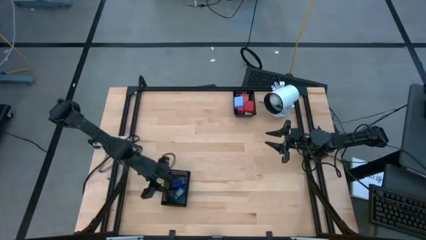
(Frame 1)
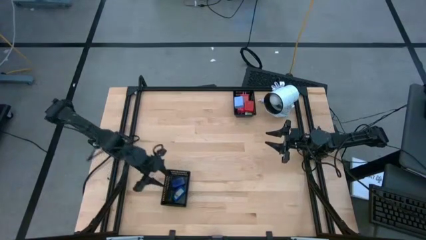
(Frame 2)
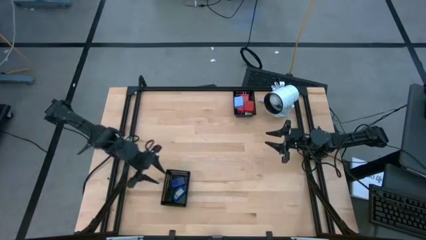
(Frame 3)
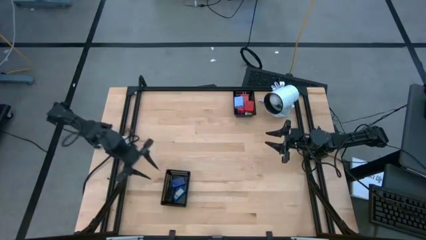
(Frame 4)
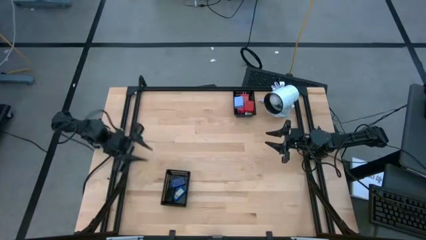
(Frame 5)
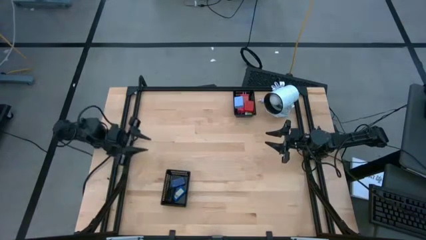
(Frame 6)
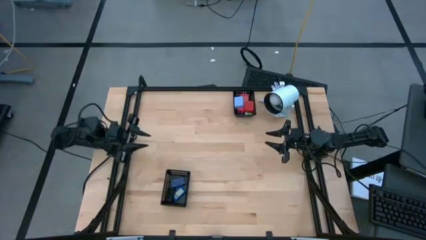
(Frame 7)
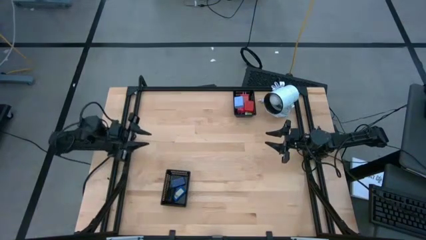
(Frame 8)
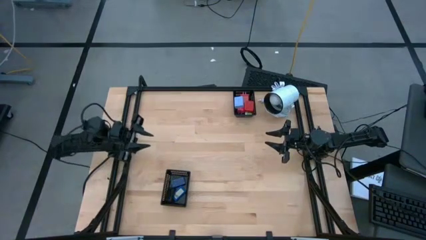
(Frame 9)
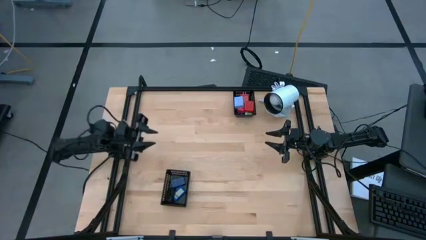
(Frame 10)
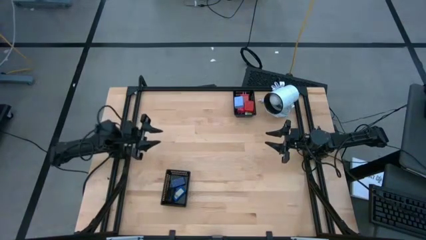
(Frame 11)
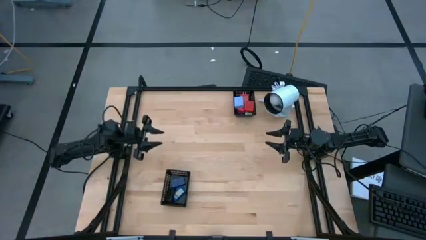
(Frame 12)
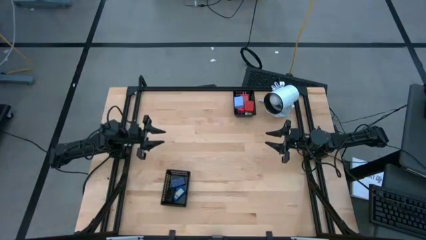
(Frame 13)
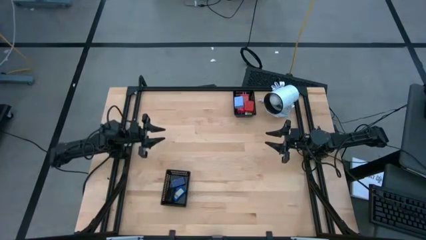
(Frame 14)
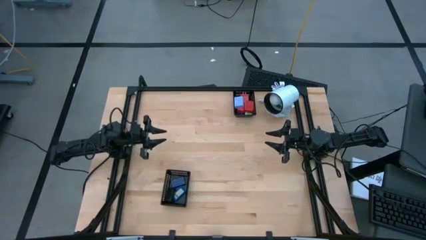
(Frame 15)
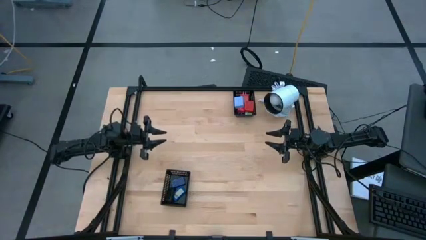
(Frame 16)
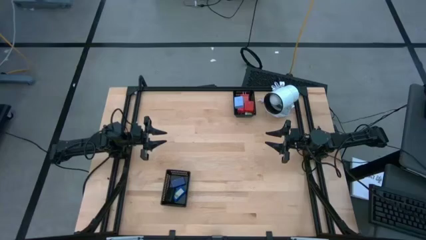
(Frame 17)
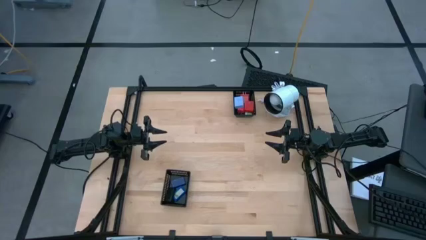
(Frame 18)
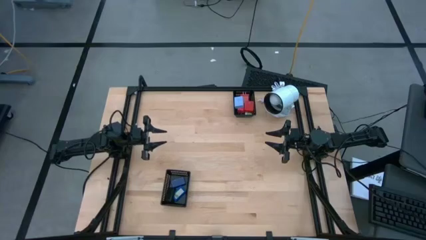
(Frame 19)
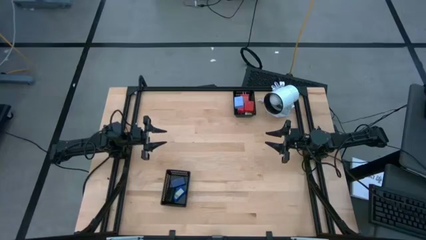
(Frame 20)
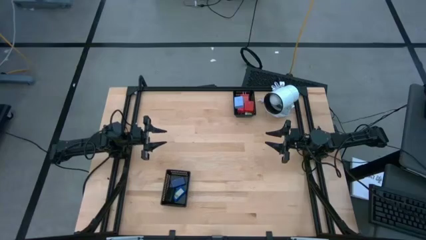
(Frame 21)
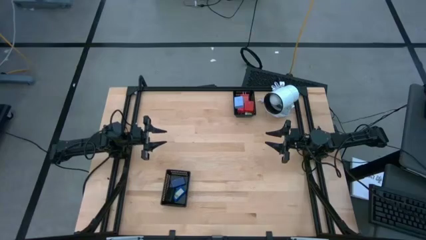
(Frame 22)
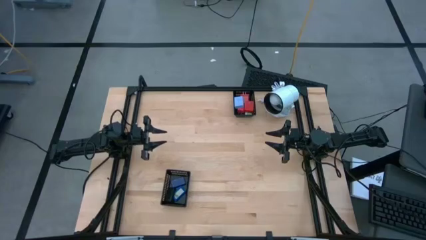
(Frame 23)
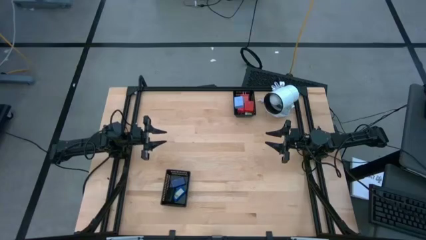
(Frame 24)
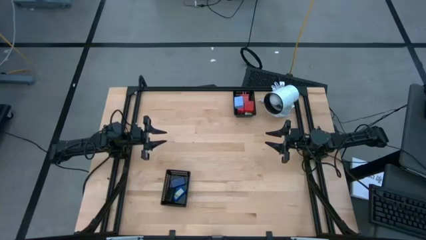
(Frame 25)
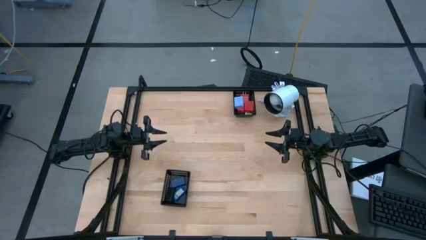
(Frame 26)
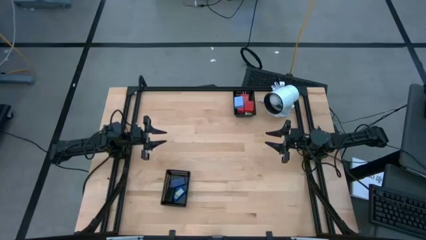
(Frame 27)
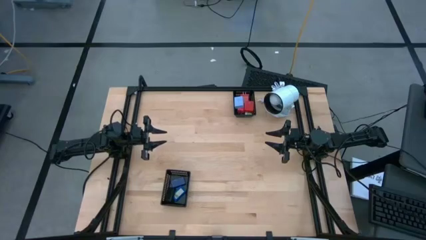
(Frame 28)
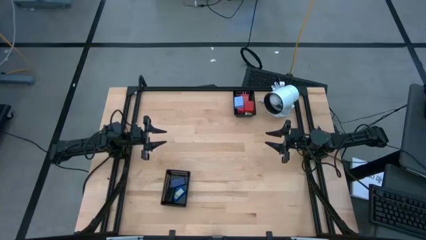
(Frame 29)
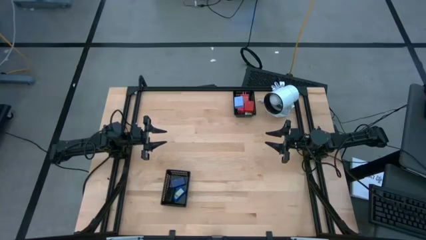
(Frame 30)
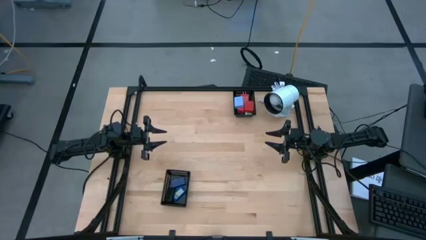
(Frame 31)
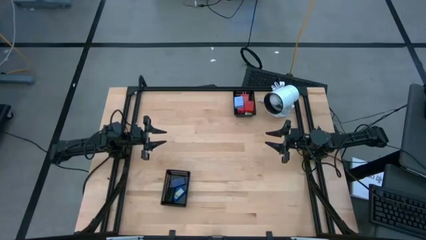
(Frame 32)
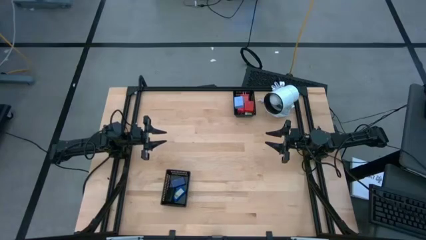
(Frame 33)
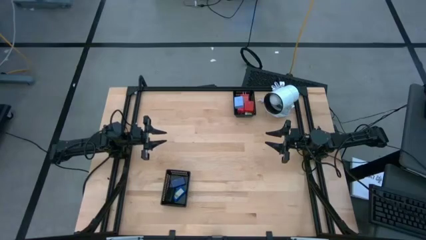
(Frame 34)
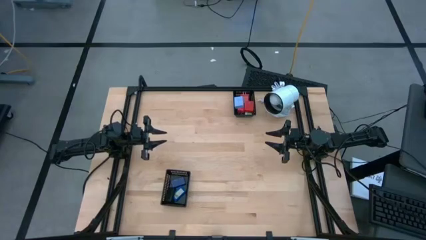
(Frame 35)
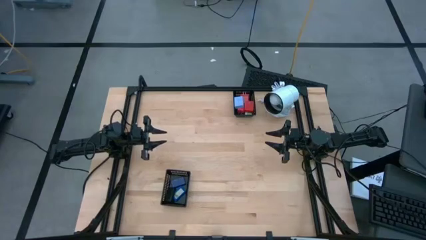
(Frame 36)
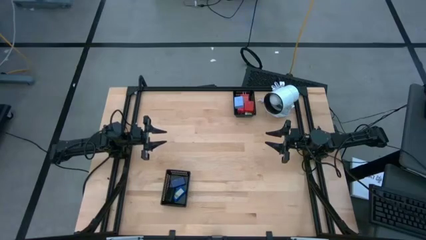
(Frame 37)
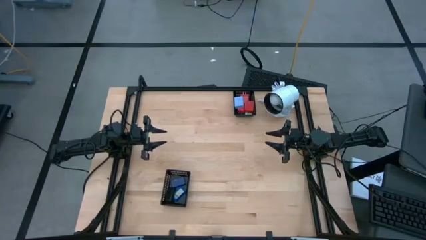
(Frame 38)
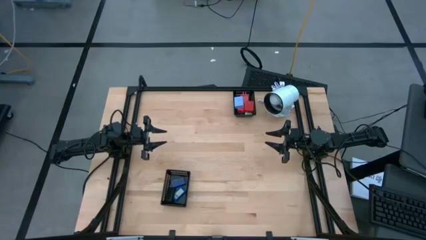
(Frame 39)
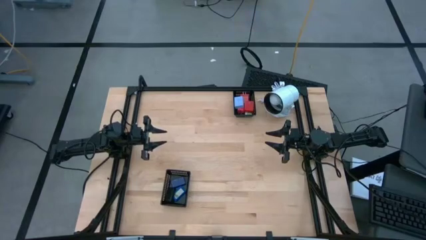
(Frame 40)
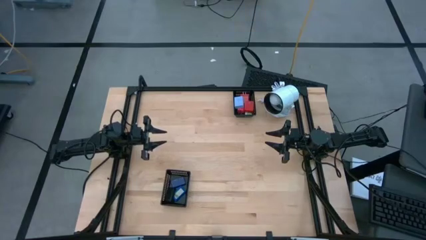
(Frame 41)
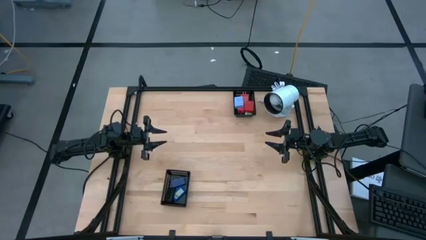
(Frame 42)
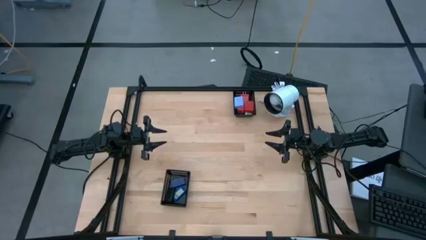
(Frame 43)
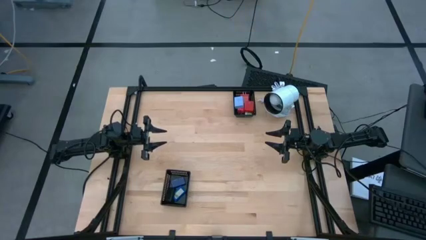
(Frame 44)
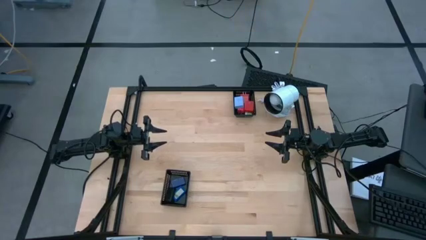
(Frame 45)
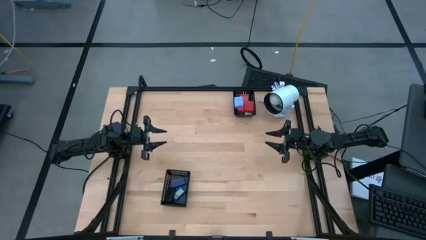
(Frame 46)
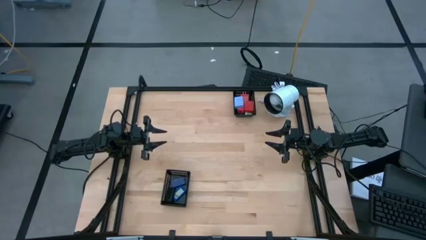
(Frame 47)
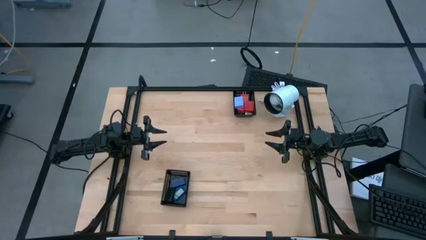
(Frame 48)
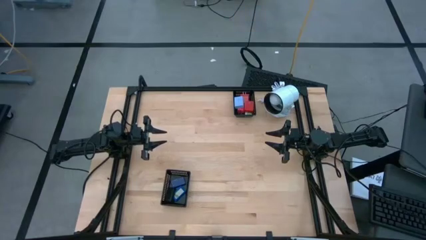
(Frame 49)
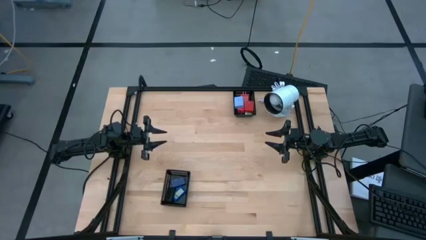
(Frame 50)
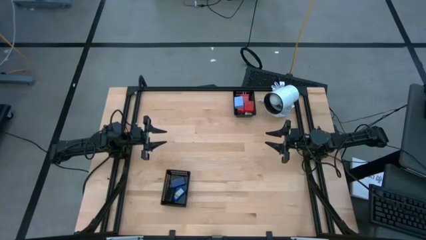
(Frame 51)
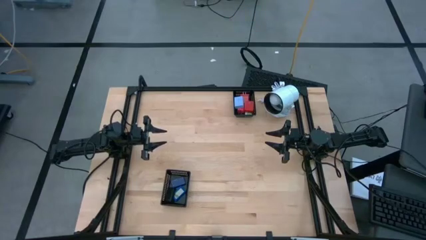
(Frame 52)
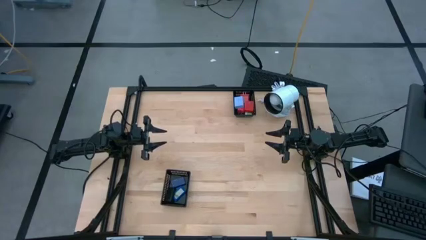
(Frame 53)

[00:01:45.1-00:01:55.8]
Task: Pick & Place Office items
Return to Home Position

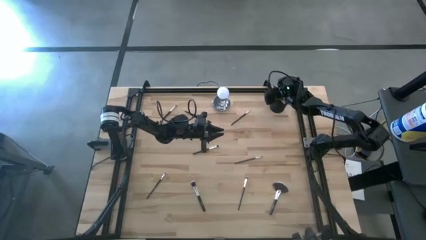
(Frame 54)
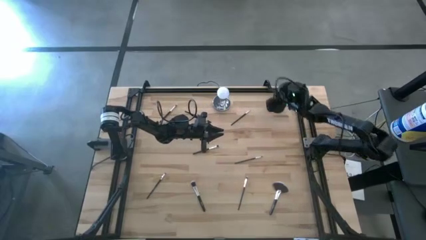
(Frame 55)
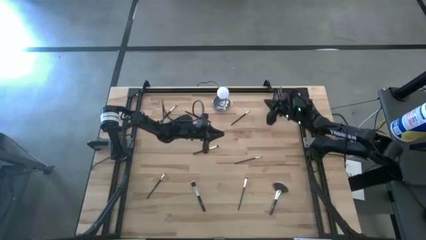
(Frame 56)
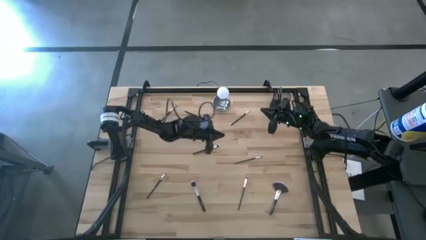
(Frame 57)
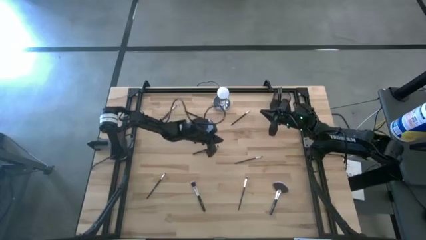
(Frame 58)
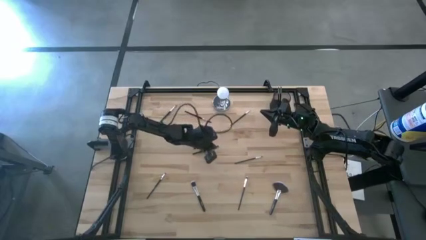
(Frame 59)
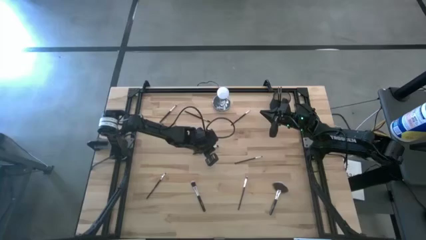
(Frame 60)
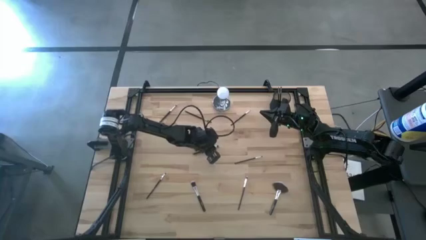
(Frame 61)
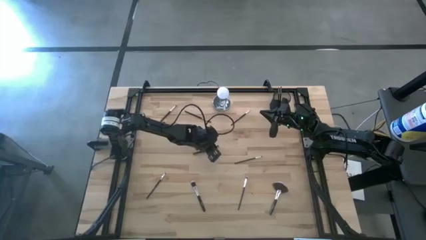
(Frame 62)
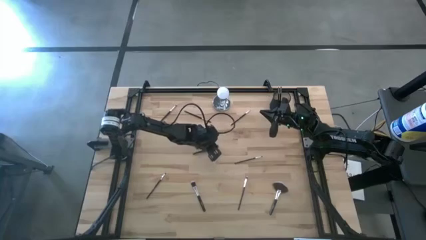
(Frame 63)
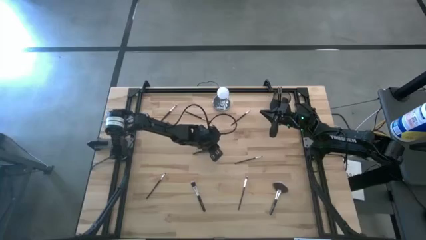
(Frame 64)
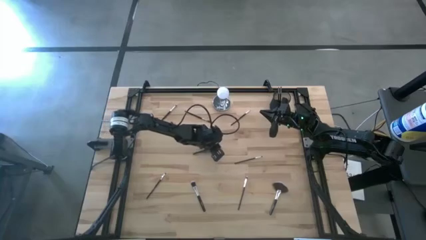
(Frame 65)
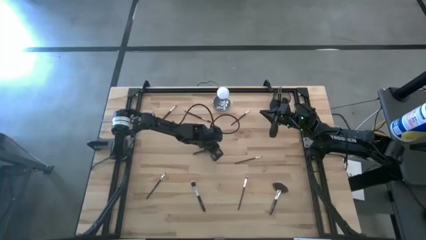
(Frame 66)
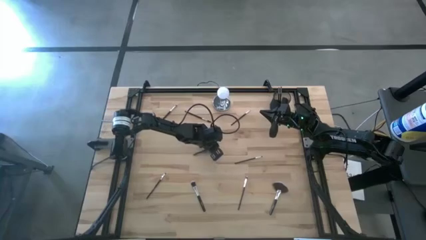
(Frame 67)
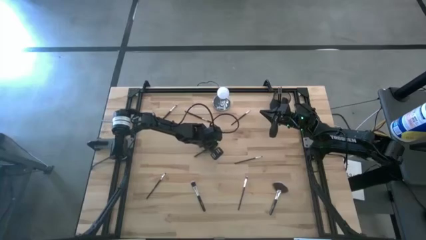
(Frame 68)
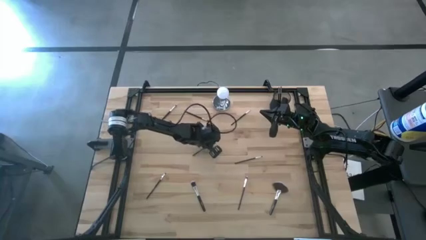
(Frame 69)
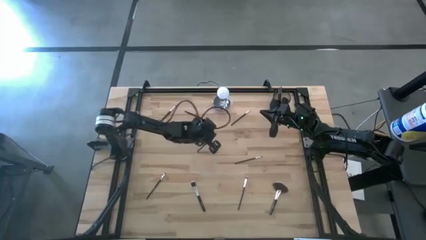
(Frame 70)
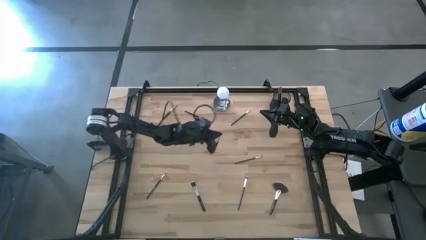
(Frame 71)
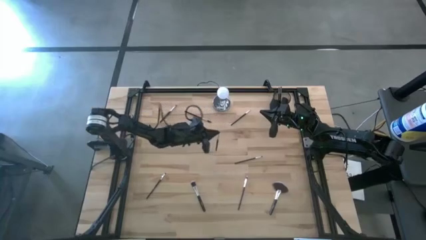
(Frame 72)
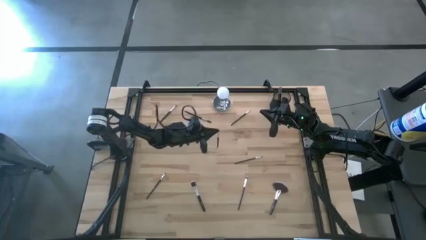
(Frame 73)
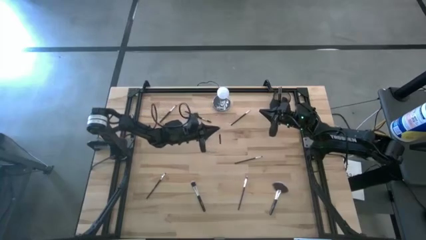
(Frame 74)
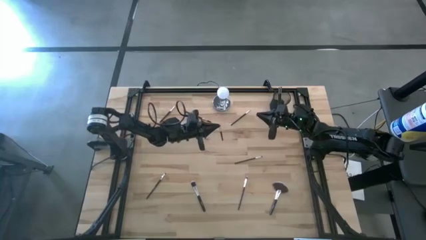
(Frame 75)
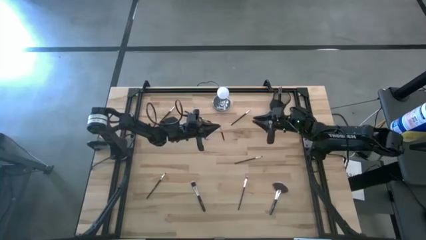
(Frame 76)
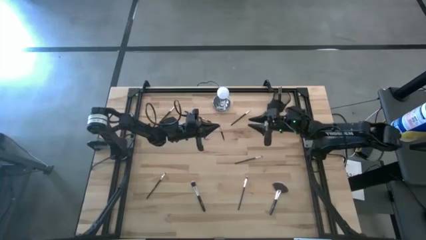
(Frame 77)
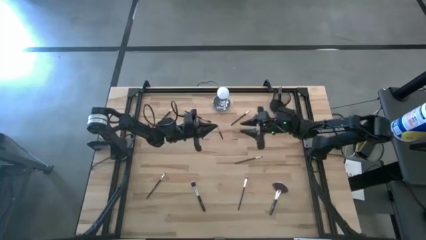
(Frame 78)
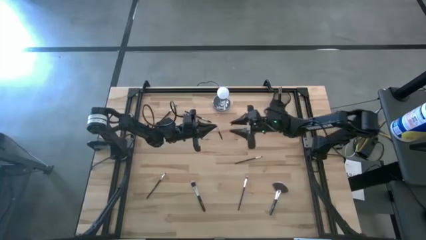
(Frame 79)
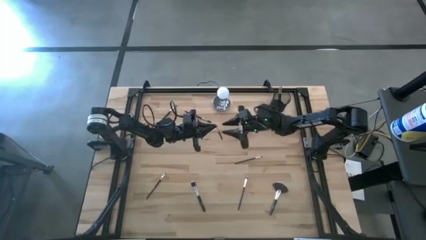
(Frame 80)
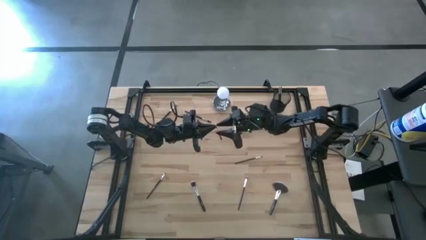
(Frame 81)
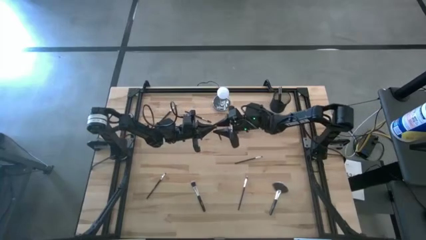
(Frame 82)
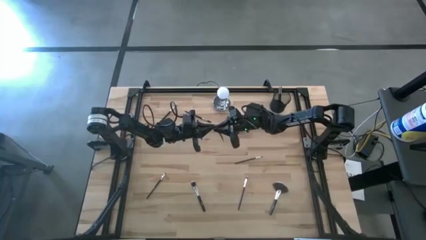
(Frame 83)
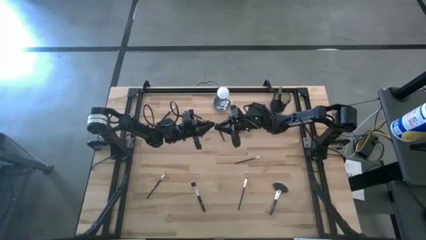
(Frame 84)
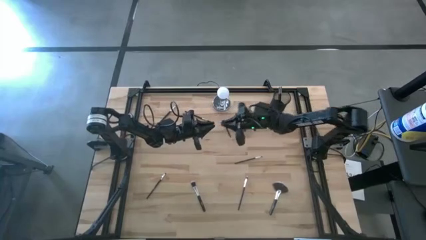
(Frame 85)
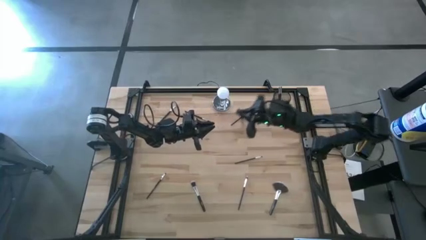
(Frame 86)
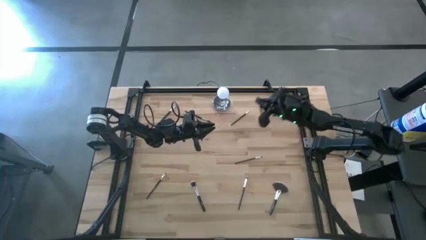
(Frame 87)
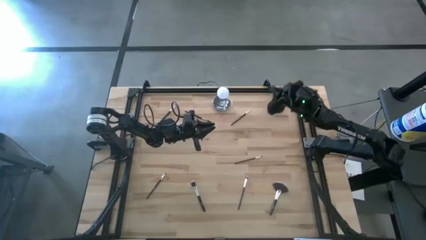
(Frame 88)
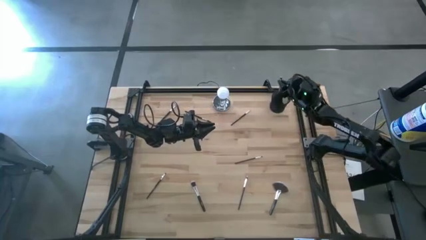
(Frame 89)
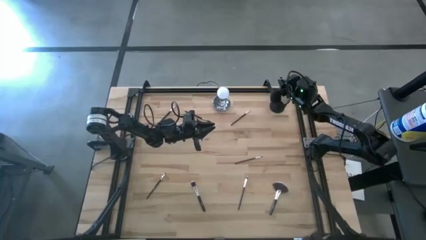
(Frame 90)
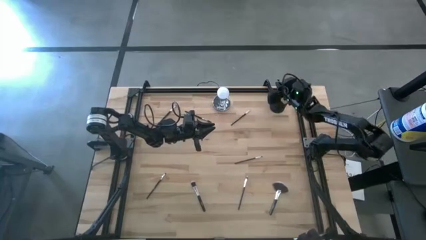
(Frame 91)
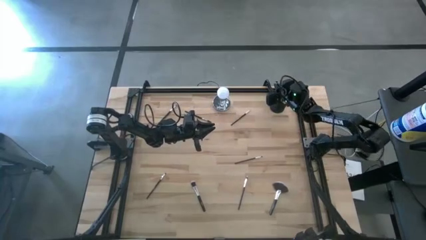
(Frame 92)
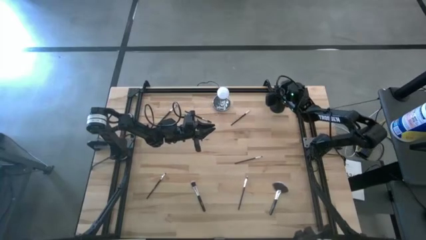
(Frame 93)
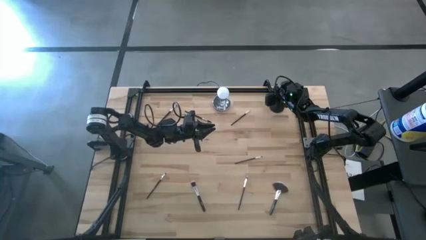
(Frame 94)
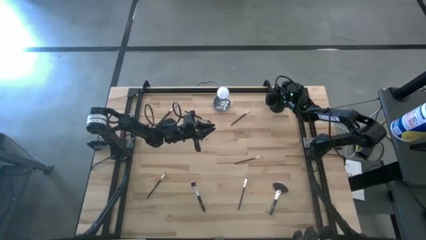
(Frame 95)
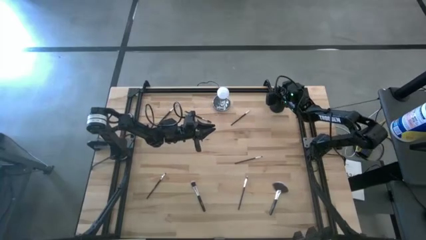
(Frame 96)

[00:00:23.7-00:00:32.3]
Task: Put items in baskets/containers
Put the black eyeshadow brush into the black pen holder
